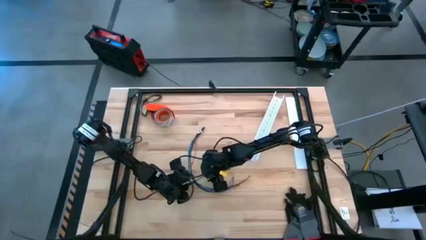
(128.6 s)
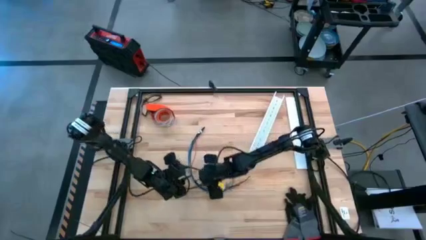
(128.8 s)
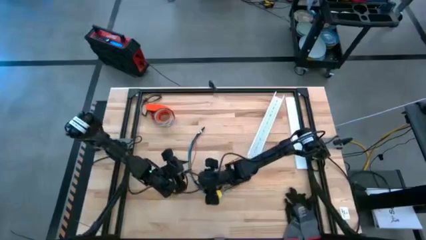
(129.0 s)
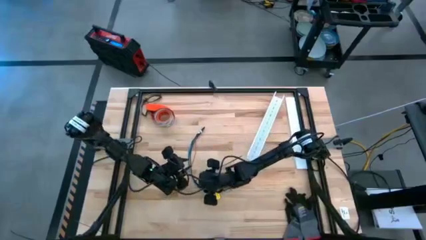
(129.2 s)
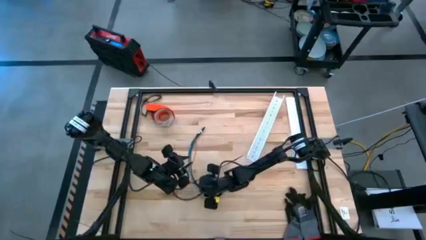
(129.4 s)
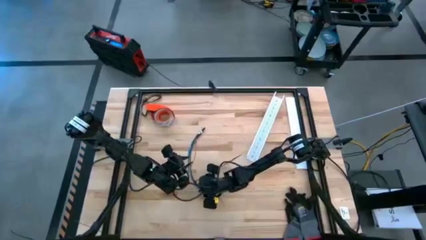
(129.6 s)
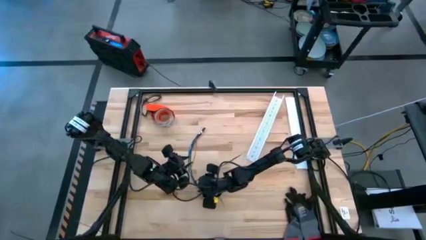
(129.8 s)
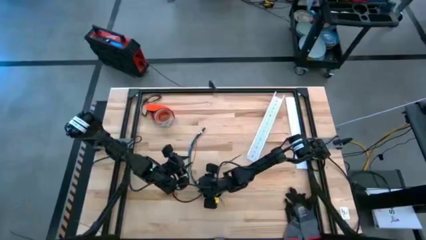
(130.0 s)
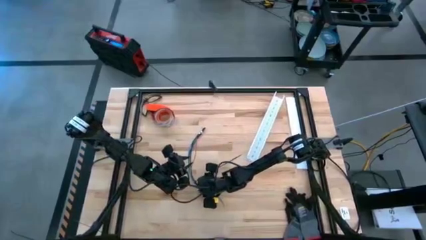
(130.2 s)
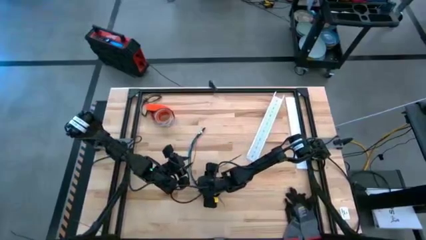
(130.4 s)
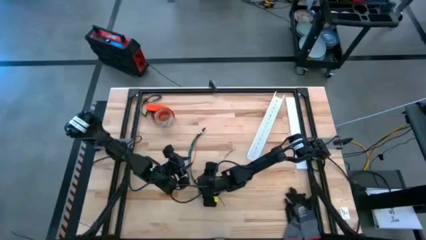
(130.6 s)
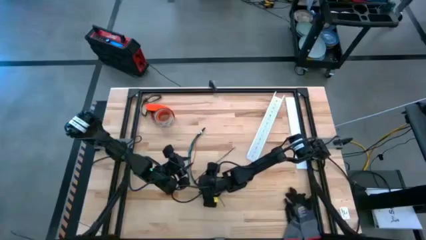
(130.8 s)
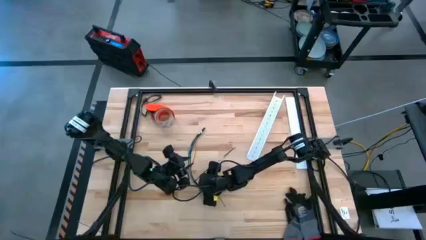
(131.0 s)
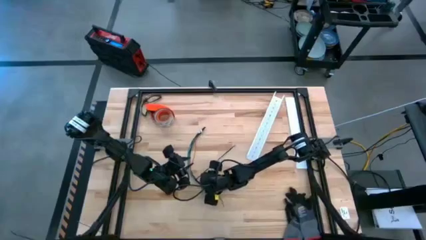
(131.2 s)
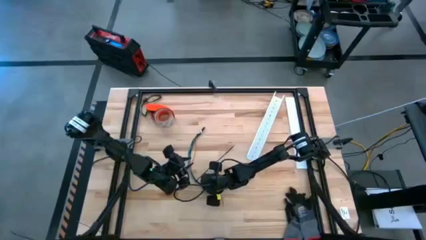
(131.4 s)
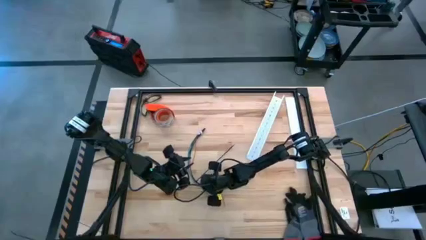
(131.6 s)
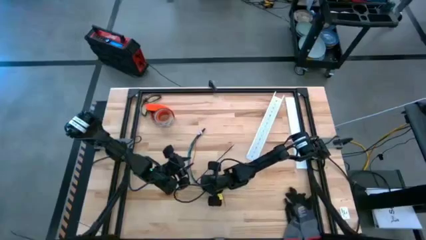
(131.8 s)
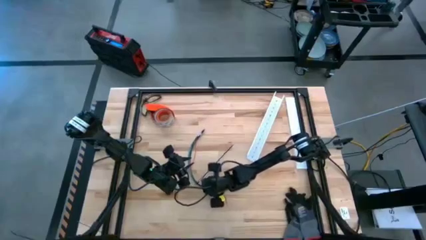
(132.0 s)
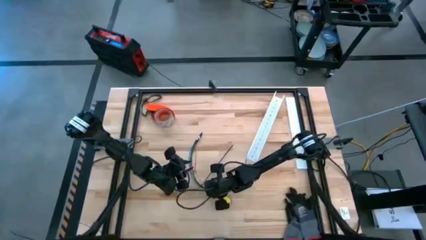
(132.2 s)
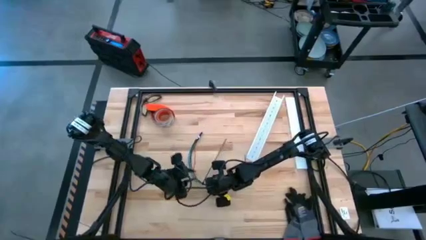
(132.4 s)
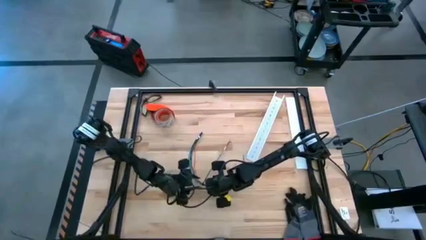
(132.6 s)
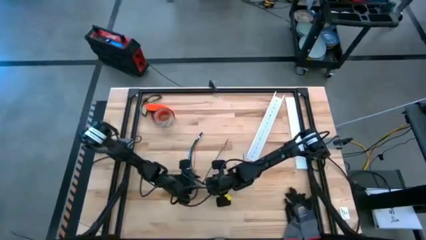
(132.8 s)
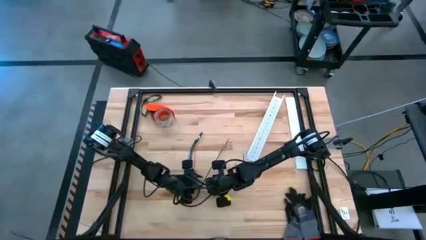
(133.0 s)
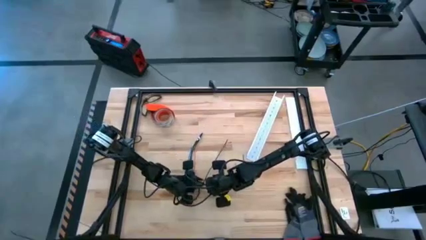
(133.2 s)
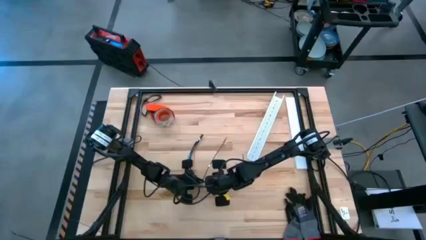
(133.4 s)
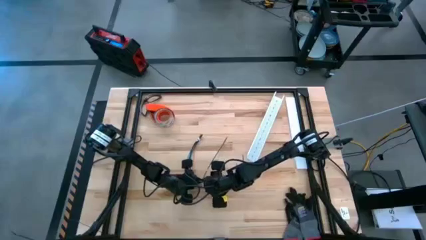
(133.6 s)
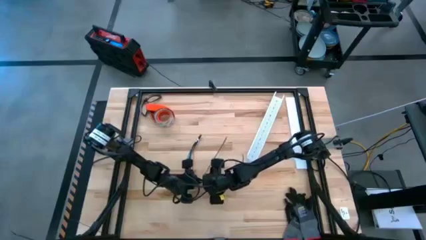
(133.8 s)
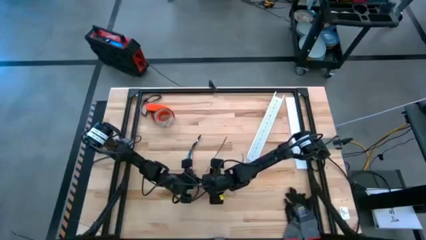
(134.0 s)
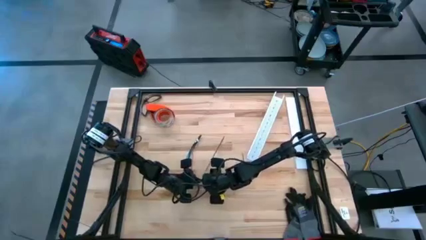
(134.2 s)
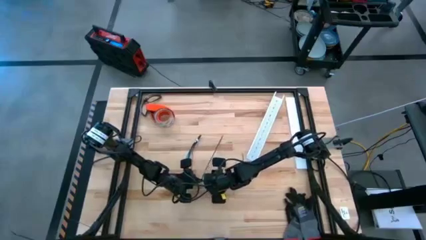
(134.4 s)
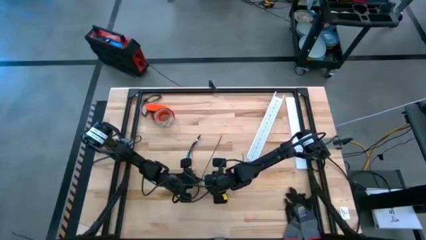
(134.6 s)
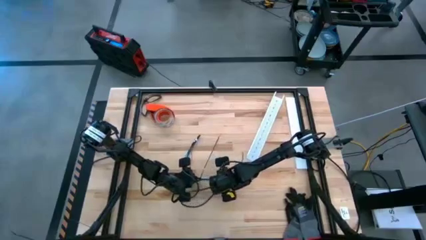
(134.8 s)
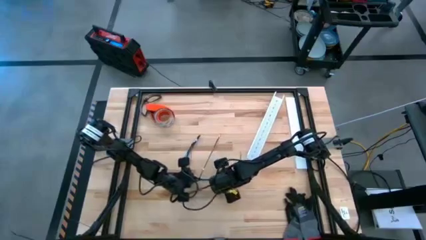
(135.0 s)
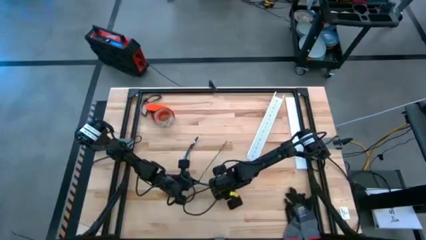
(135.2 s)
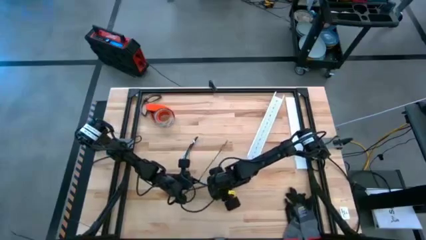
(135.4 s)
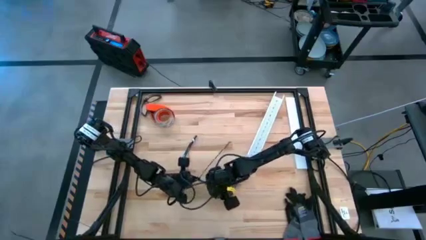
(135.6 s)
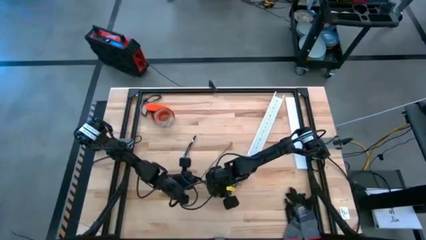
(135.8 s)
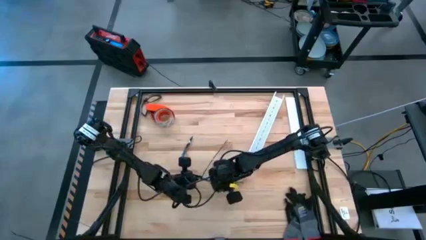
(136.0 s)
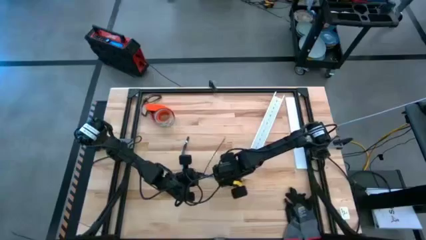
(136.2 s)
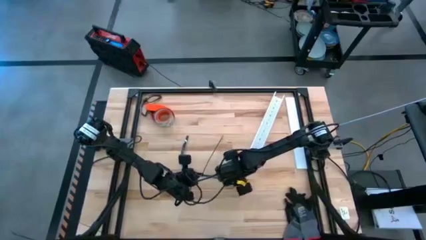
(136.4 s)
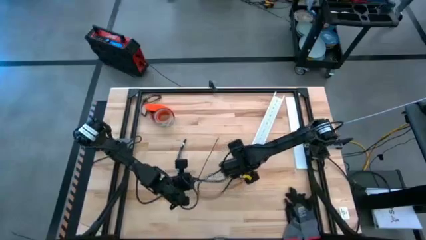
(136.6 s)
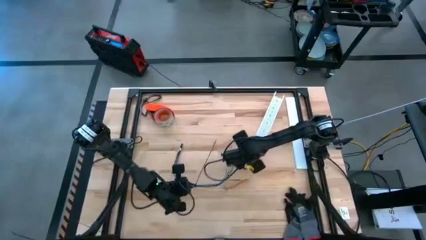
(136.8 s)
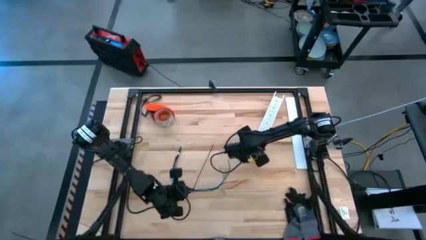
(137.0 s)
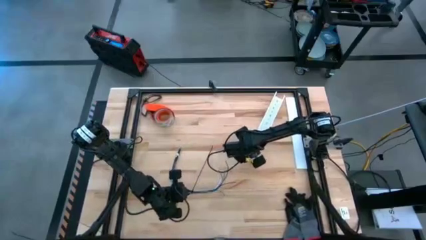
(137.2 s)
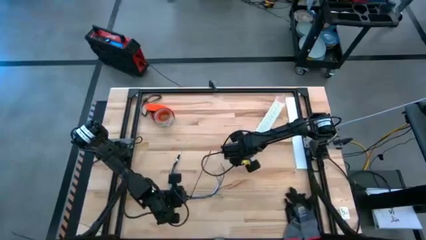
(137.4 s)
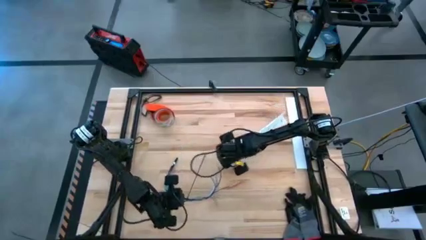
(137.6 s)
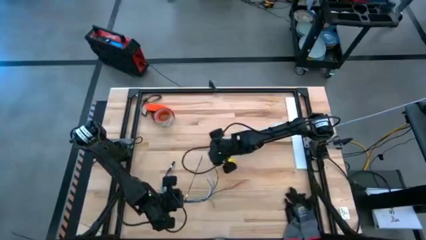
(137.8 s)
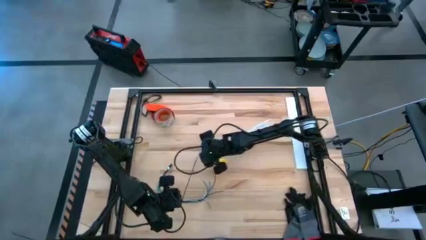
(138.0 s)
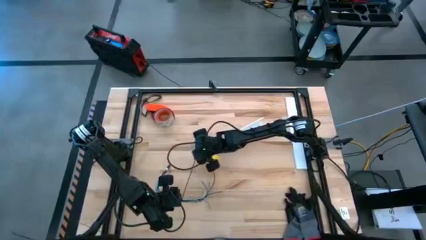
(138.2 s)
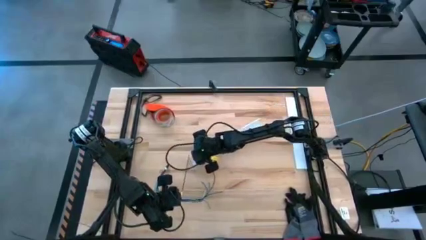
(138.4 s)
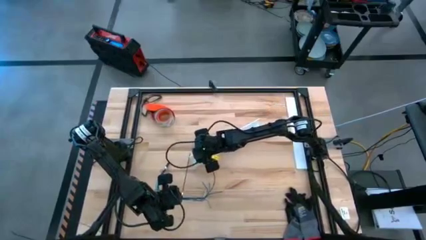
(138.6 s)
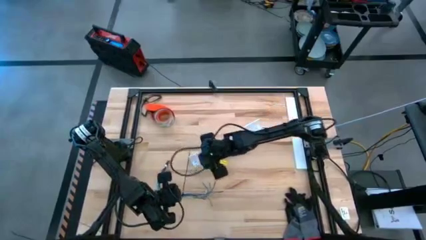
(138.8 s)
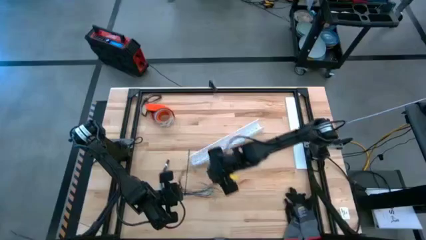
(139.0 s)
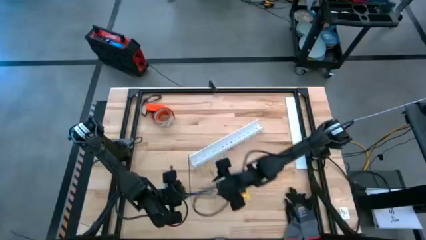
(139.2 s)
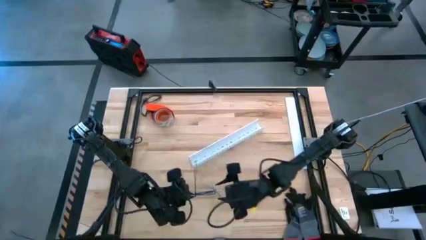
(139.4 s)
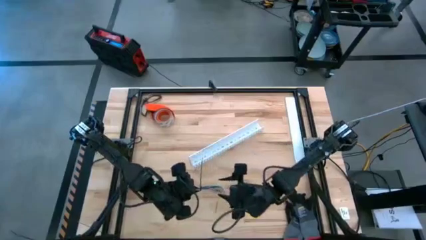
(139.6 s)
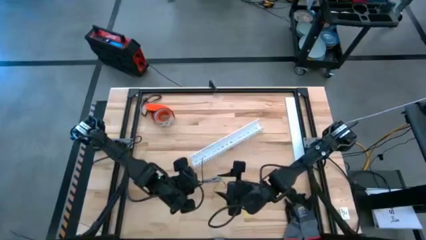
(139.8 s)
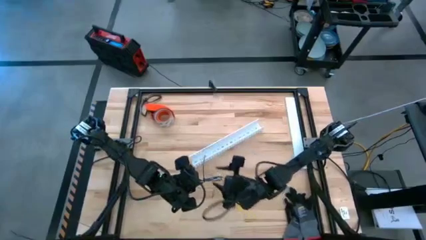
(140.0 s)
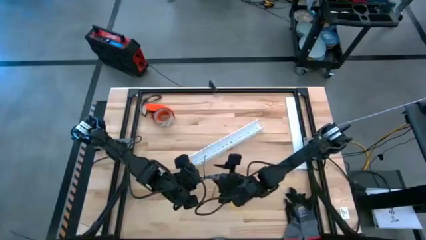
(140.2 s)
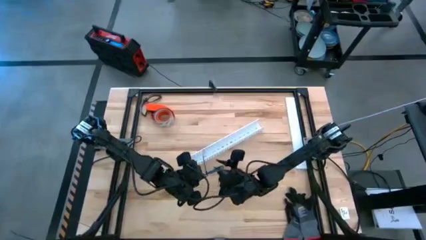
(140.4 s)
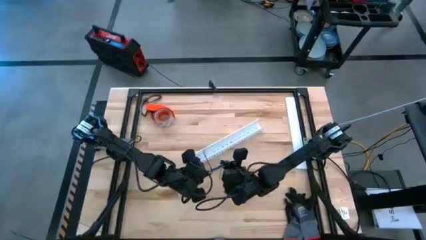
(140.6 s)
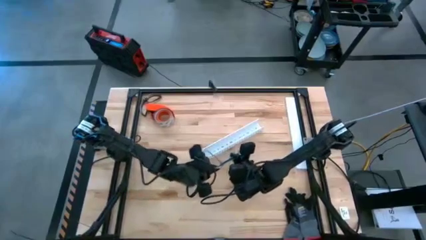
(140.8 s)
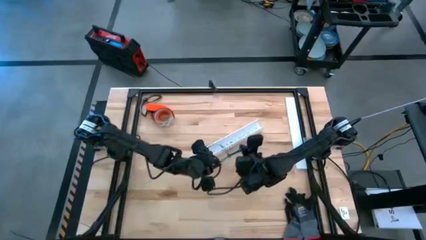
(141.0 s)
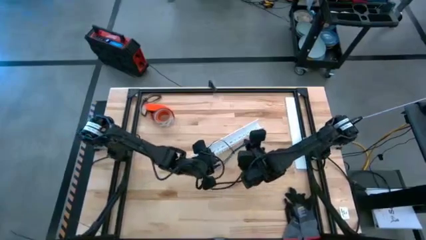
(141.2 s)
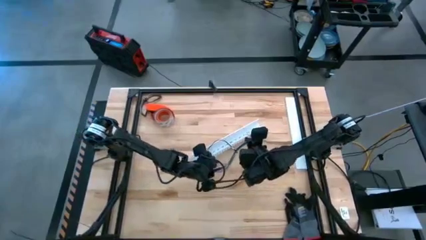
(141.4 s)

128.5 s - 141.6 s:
Task: Ziptie cables
Put the black zip tie cables on the white cable duct
